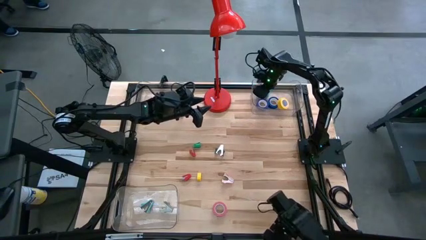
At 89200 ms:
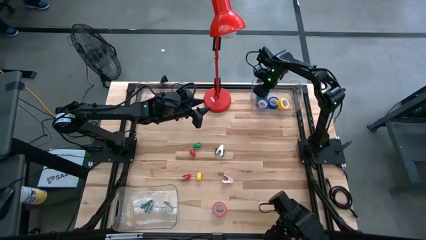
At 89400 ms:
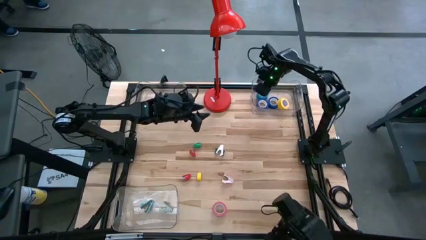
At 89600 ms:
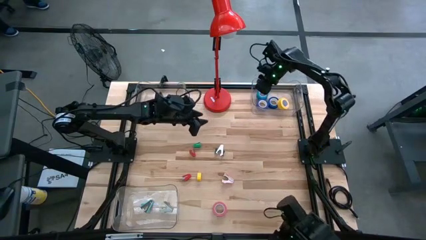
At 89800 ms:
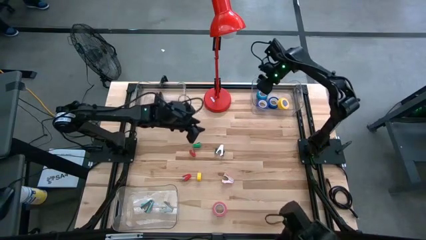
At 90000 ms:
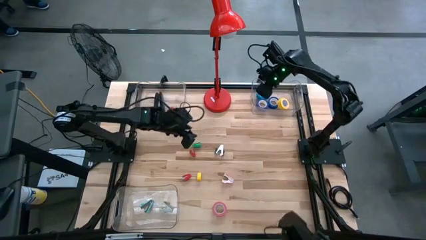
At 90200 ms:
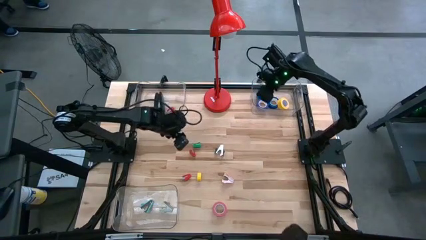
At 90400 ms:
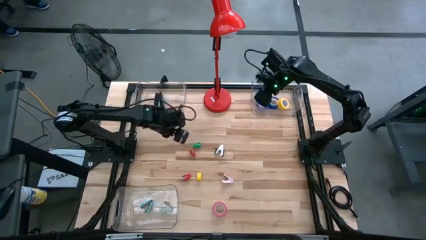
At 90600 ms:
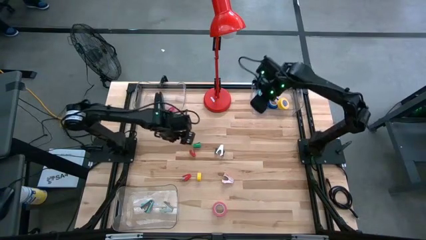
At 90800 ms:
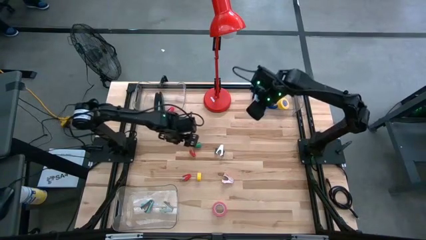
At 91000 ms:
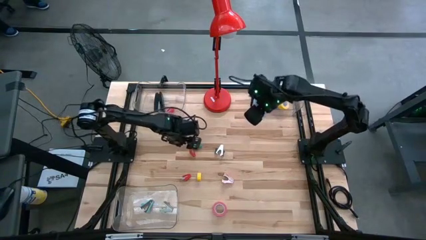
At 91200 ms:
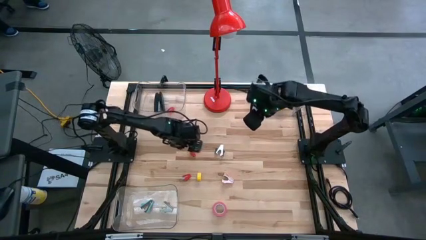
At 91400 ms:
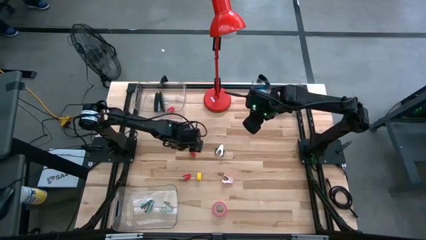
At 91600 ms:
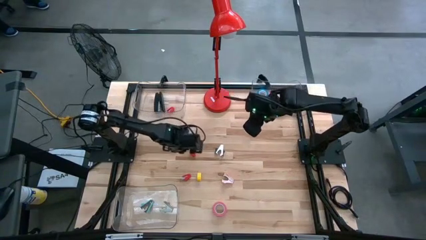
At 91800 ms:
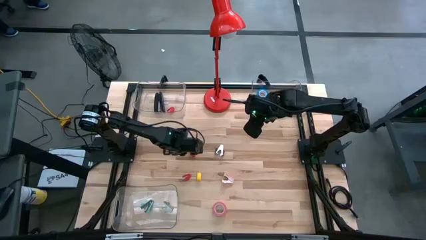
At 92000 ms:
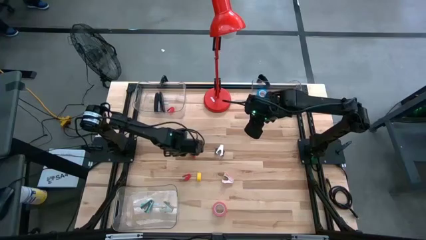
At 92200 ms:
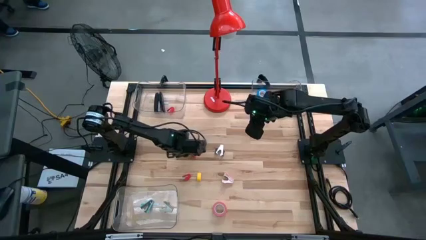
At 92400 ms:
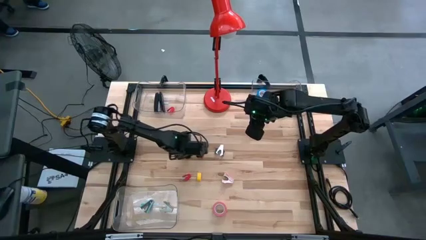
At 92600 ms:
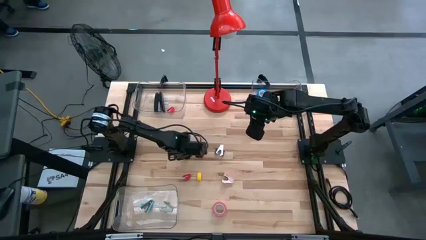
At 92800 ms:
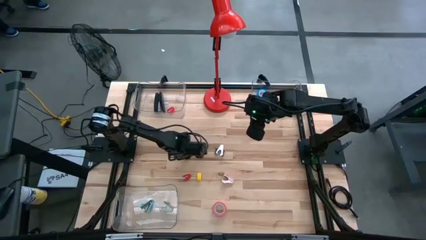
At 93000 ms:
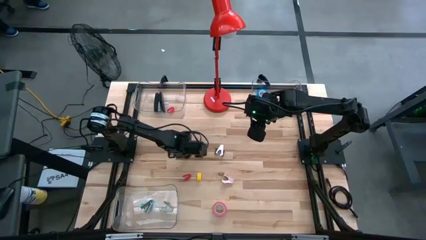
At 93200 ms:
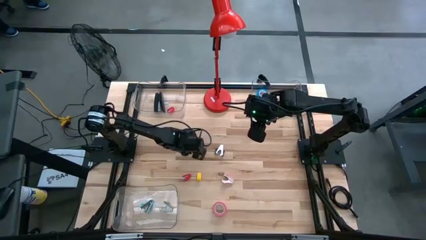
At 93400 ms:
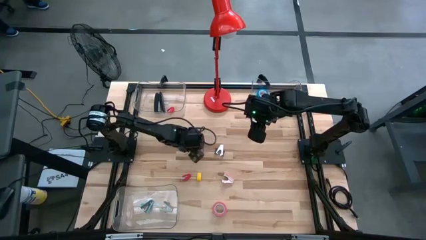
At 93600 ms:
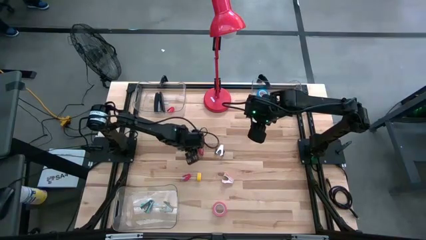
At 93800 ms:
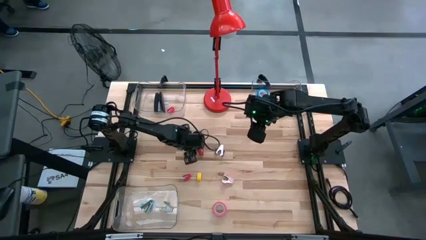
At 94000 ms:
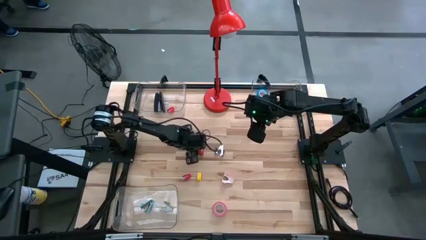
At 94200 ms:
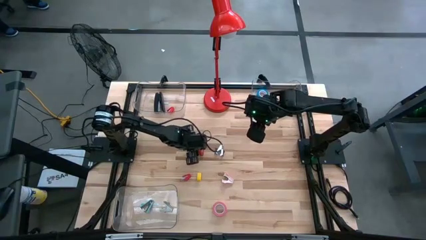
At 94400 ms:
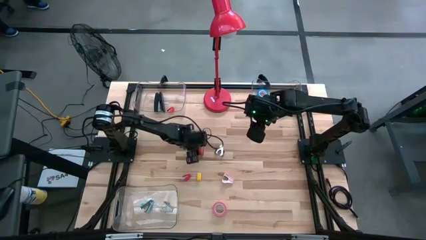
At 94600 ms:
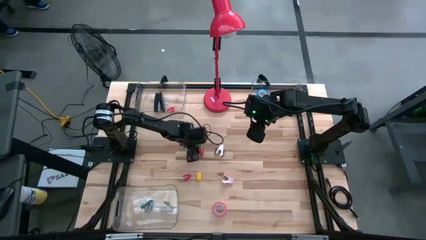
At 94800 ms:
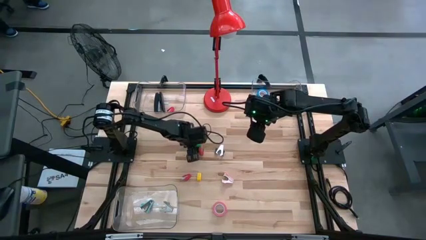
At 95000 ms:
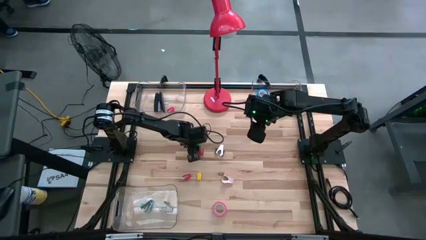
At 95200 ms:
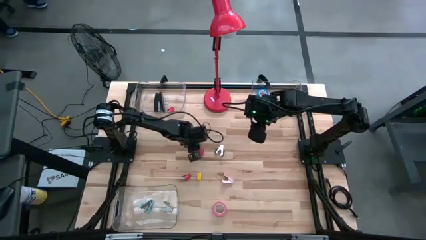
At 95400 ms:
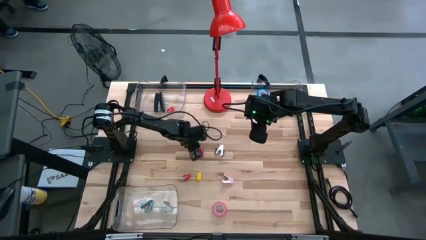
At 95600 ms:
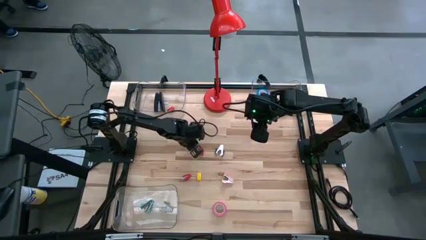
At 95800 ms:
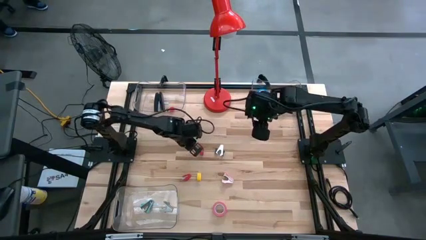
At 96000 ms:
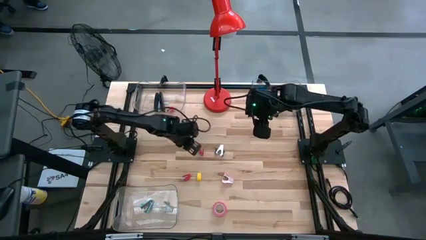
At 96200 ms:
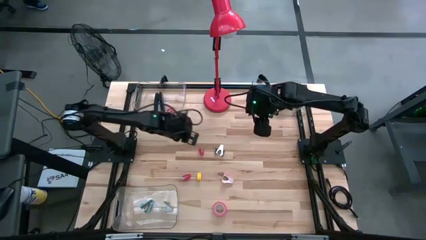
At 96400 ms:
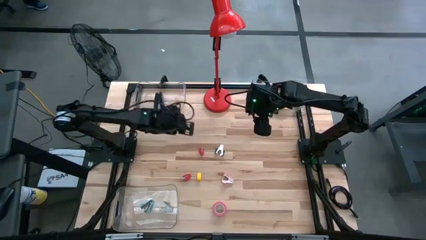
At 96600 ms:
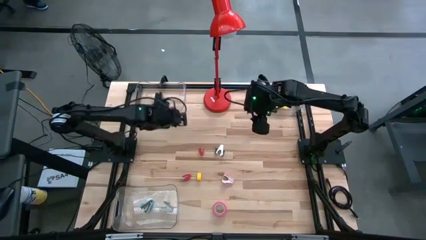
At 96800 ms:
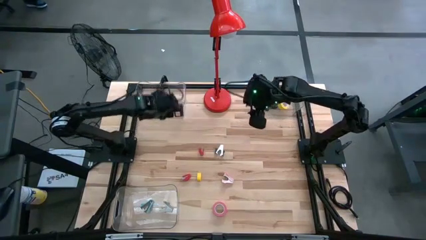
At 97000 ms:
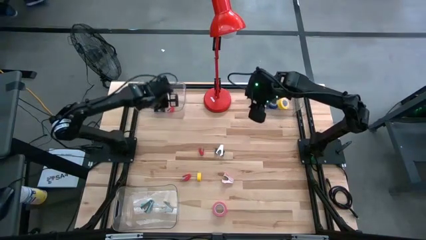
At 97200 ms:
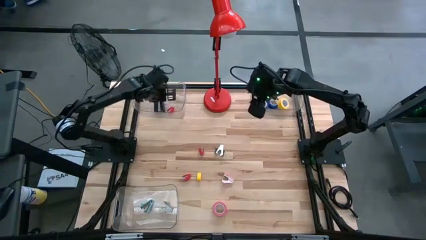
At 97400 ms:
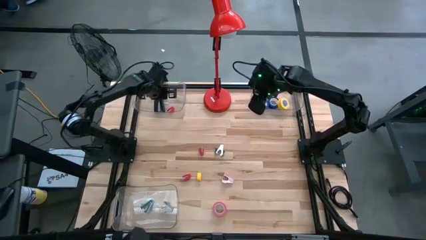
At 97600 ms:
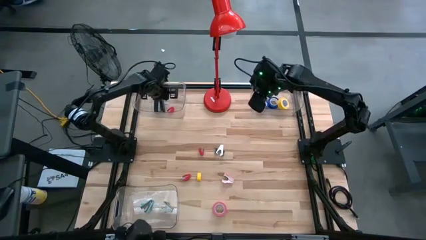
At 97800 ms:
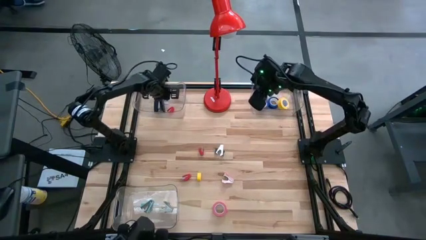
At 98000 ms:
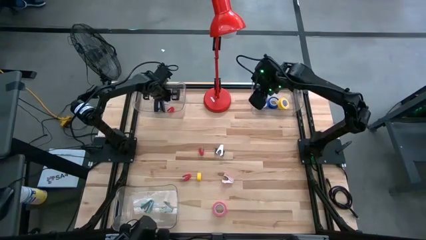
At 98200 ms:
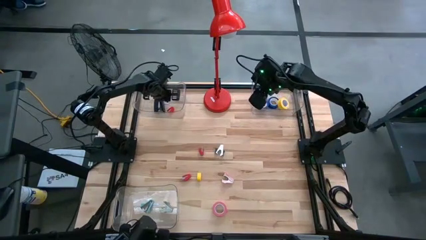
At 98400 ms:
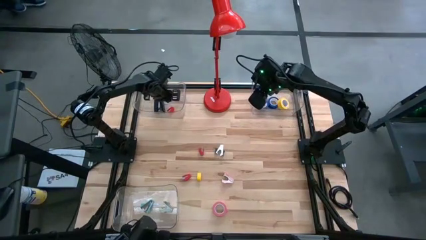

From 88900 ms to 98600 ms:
Task: Pick and place Stapler, Stapler remover, tape
Put the green stapler into the top left transparent bin

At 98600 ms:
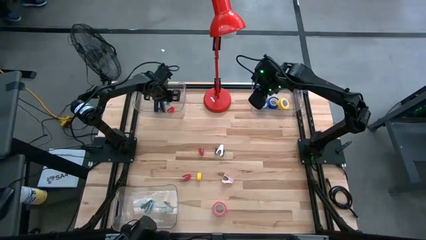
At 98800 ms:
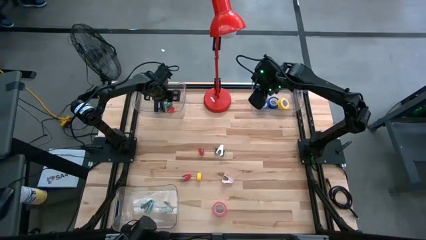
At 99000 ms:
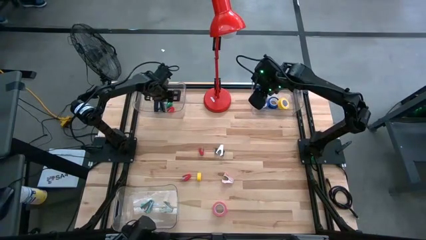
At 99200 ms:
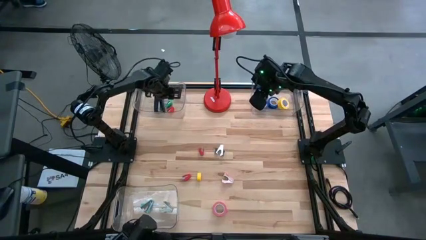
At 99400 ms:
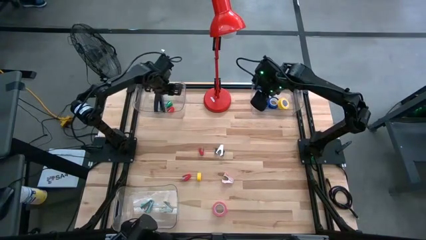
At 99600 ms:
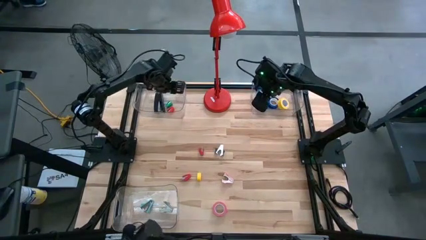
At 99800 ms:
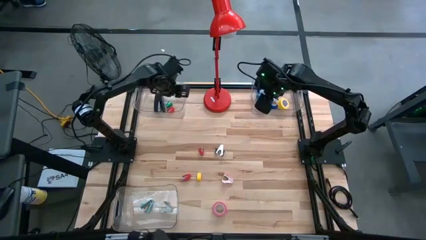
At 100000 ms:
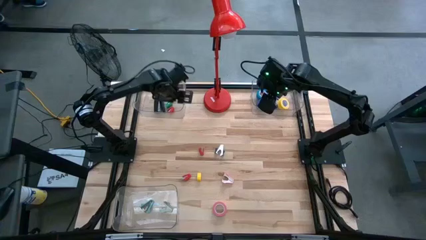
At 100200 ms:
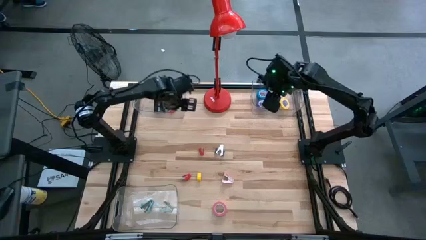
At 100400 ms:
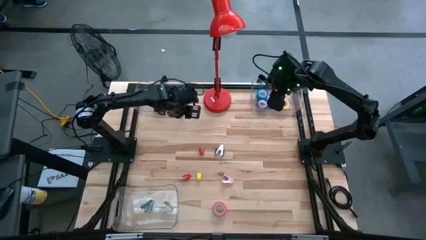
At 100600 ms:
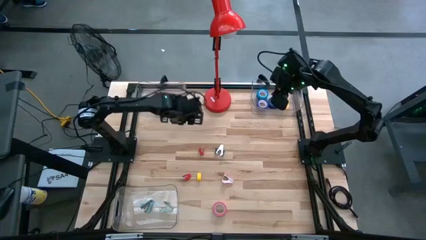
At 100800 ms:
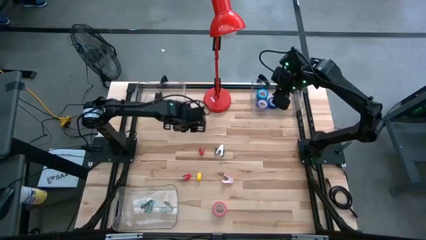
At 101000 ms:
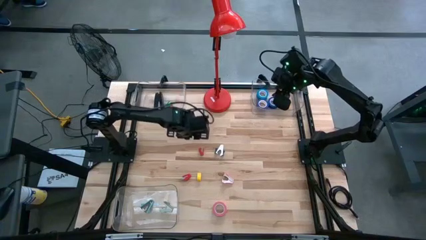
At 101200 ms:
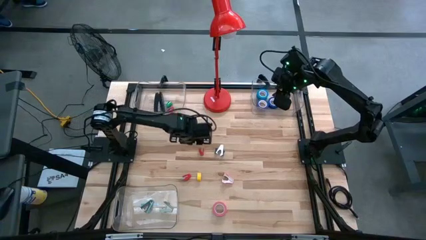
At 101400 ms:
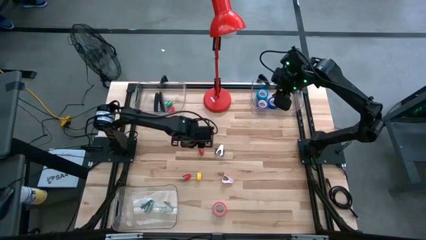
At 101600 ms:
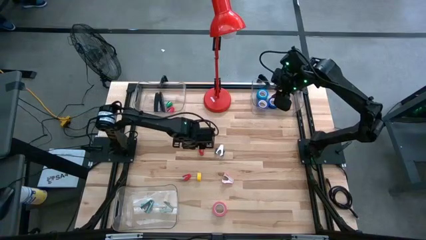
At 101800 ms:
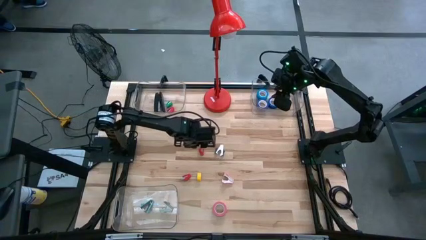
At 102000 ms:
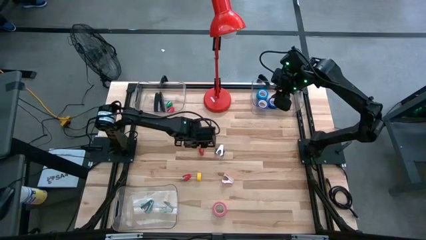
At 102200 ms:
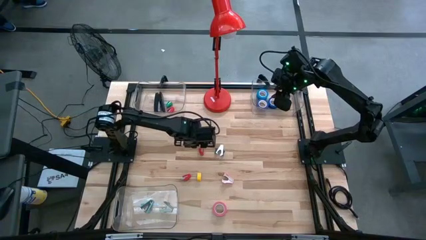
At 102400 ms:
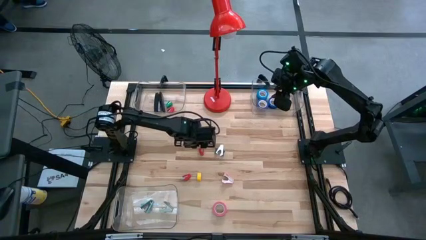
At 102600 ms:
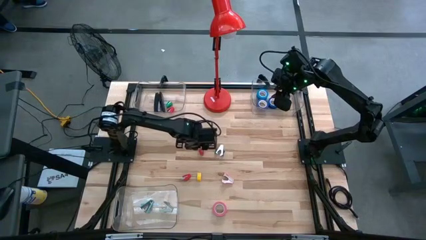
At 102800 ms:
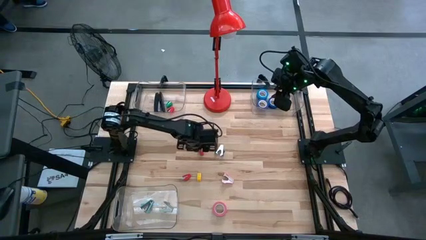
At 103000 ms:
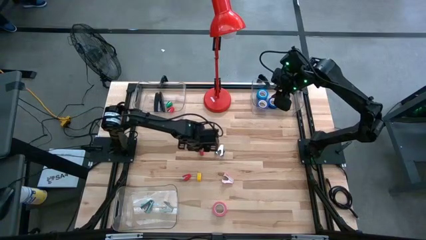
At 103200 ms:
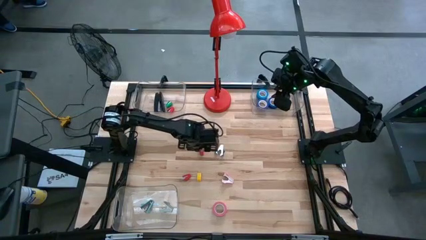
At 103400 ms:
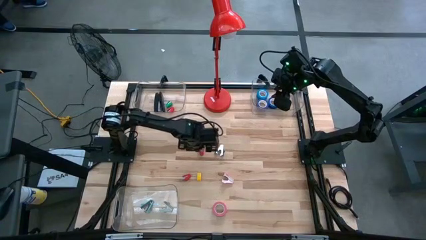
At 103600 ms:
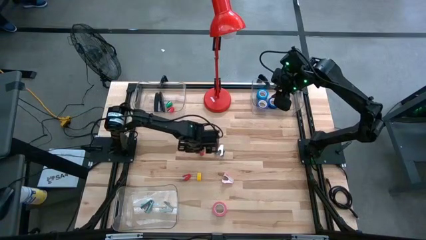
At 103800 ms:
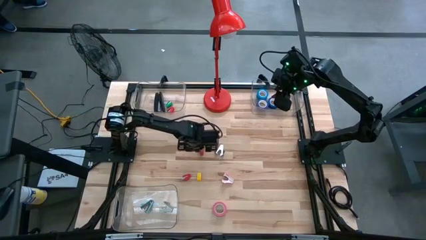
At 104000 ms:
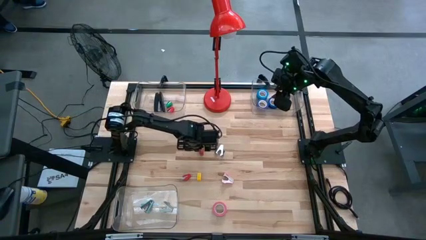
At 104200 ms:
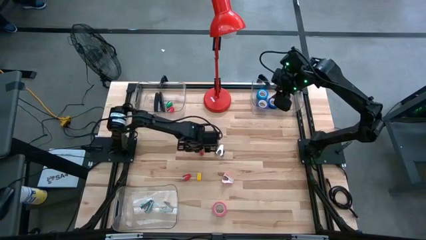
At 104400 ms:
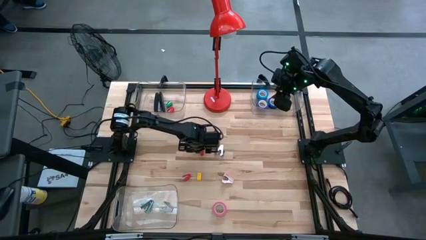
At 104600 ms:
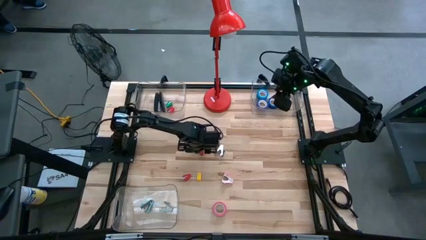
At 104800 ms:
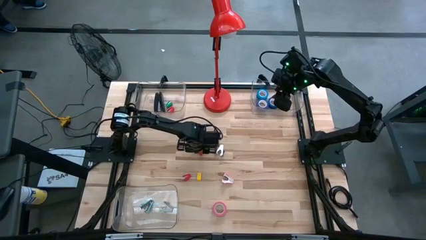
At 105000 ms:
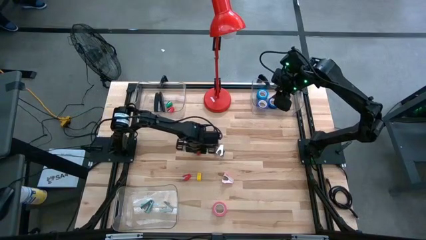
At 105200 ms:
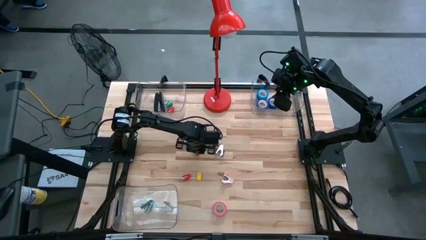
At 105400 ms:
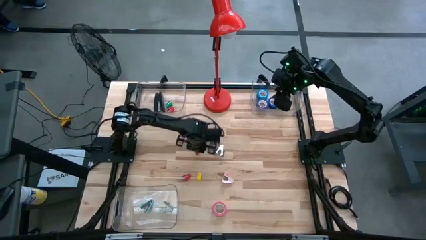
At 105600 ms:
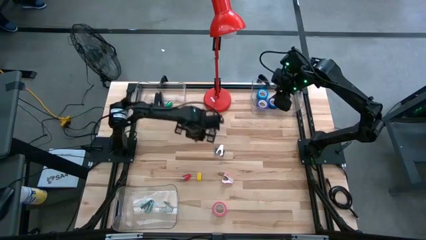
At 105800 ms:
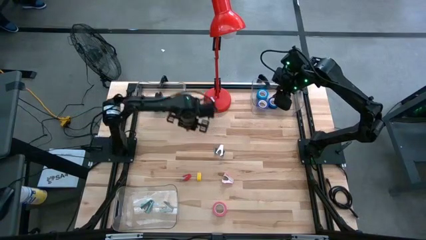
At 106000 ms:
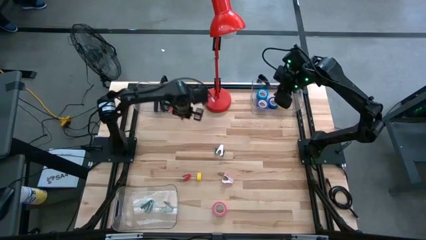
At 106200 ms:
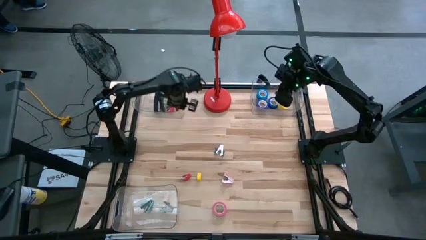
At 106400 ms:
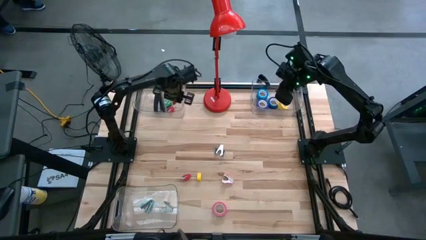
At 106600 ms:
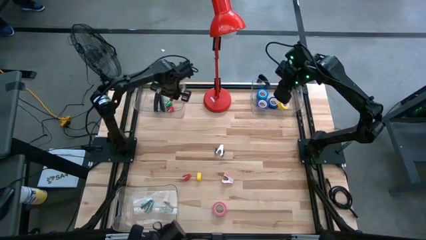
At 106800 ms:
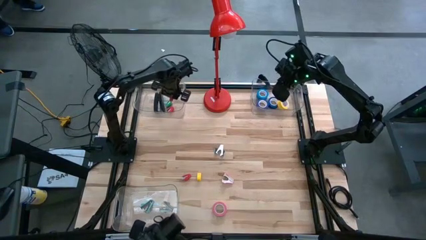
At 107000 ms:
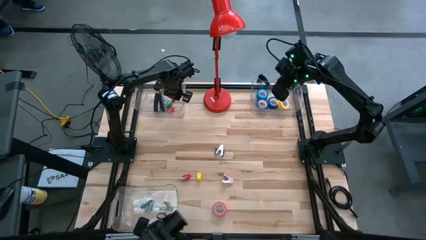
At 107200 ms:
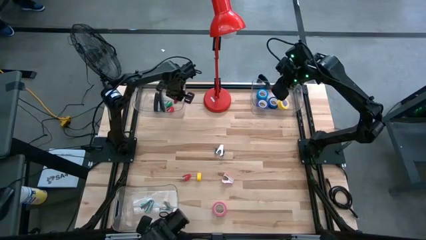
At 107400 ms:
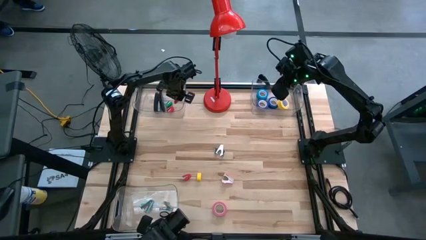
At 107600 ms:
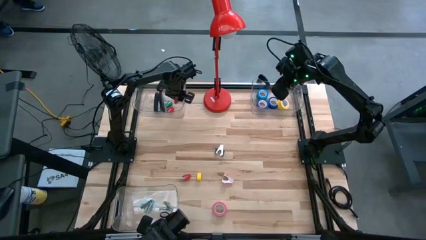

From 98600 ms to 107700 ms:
Put the top red stapler into the top left transparent bin
